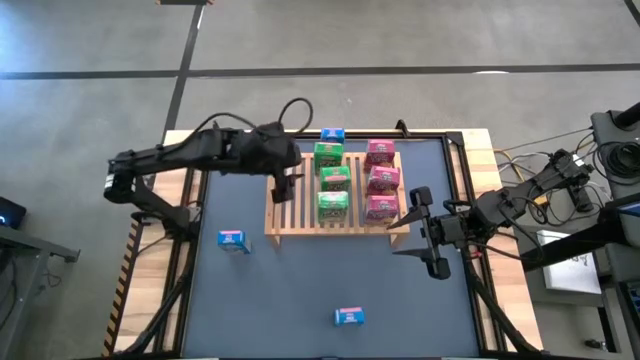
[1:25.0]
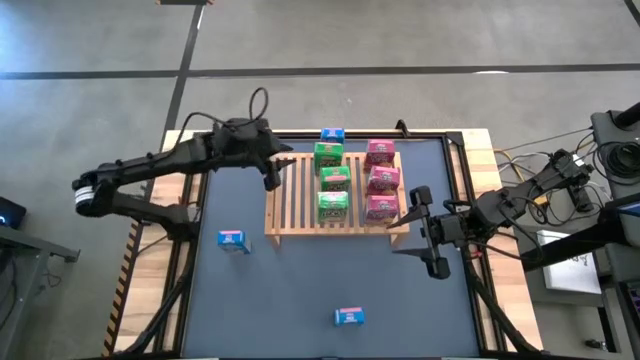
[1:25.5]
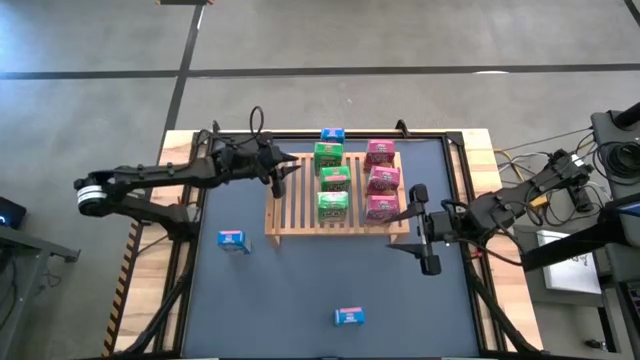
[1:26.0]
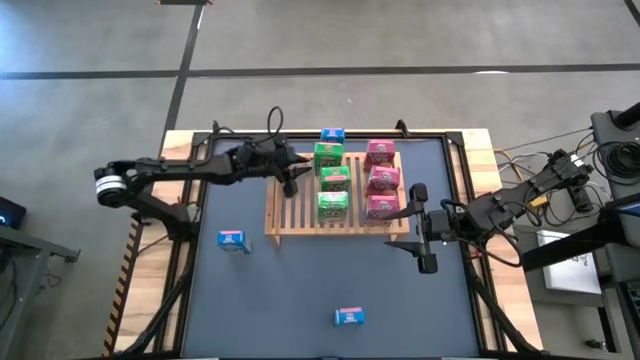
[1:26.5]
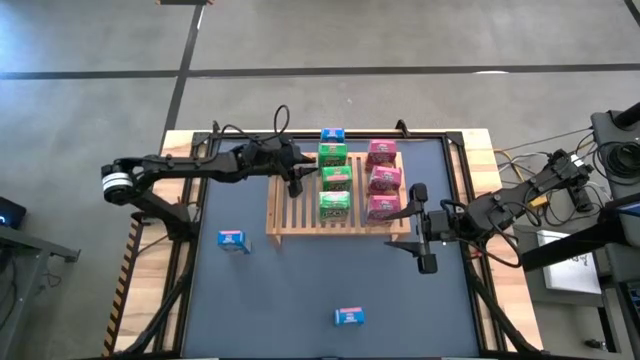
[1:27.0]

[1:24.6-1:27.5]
Task: Stack cereal on shelf
Adjust the green cereal box on the shelf

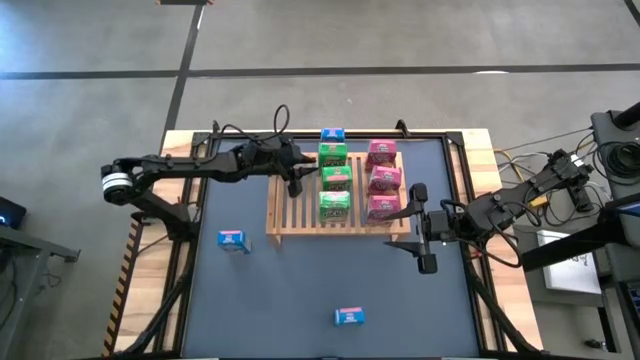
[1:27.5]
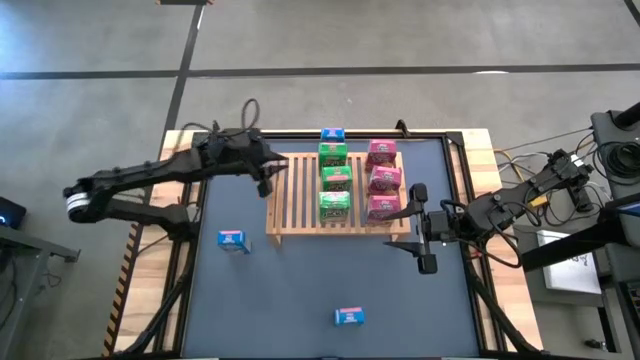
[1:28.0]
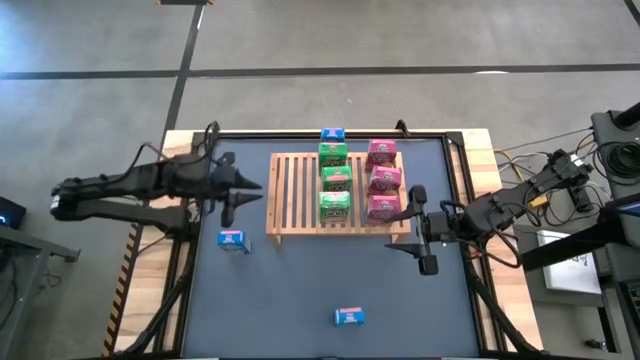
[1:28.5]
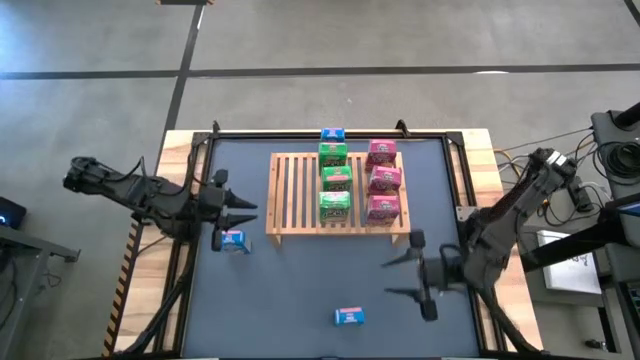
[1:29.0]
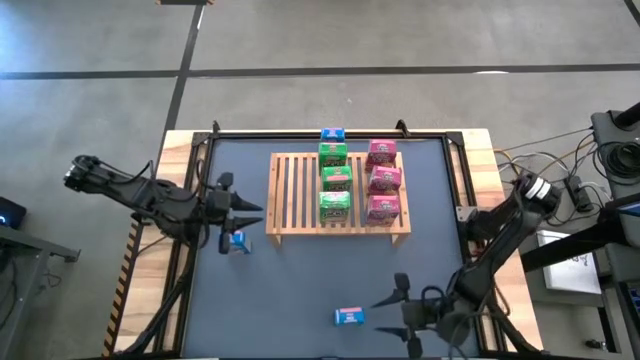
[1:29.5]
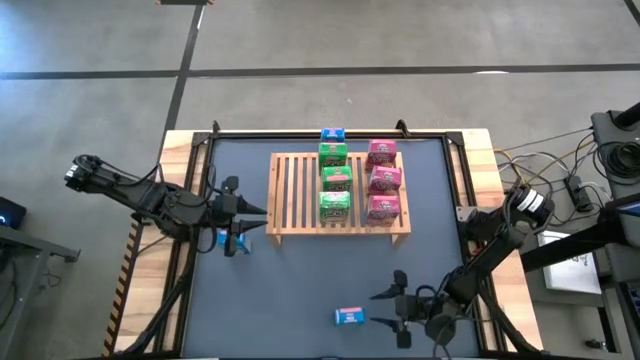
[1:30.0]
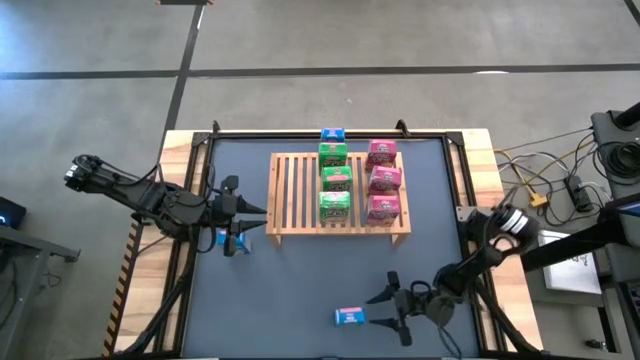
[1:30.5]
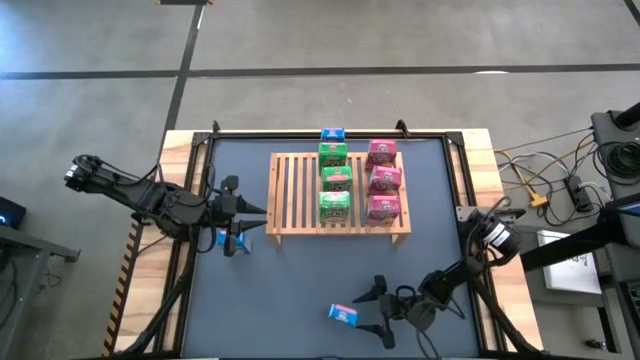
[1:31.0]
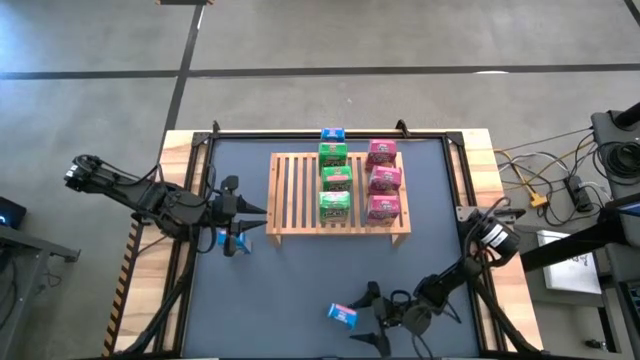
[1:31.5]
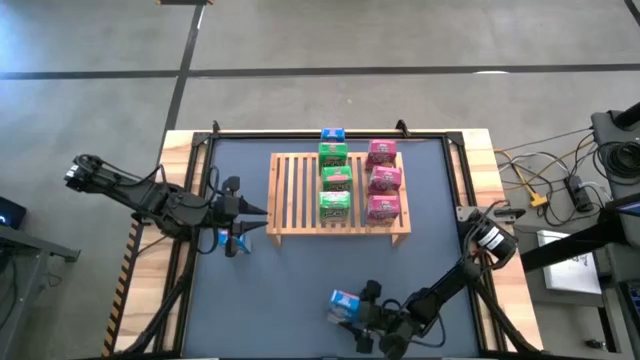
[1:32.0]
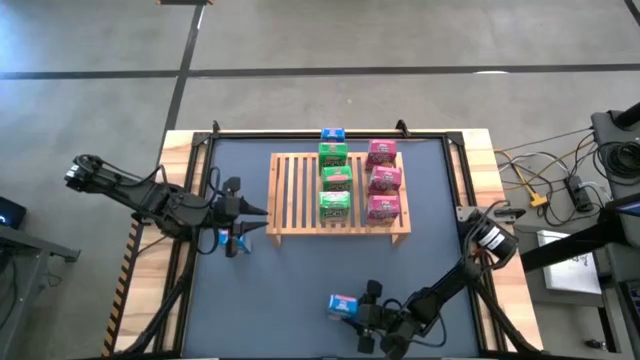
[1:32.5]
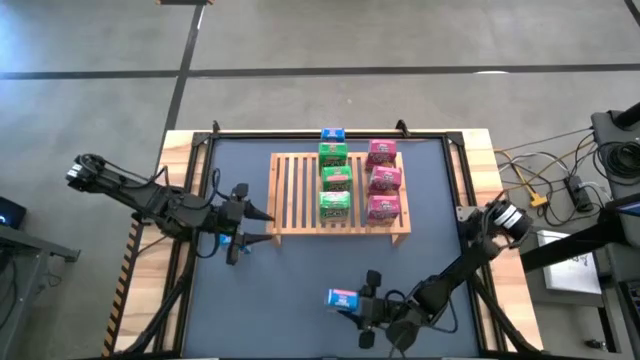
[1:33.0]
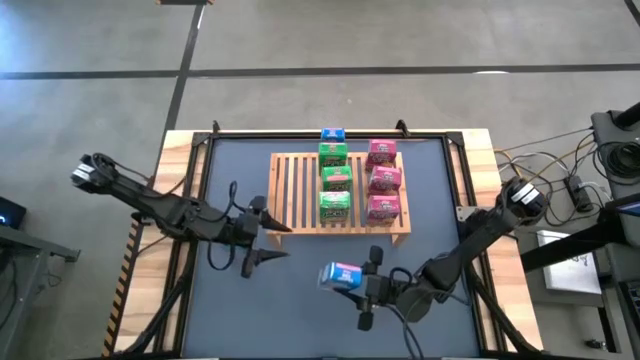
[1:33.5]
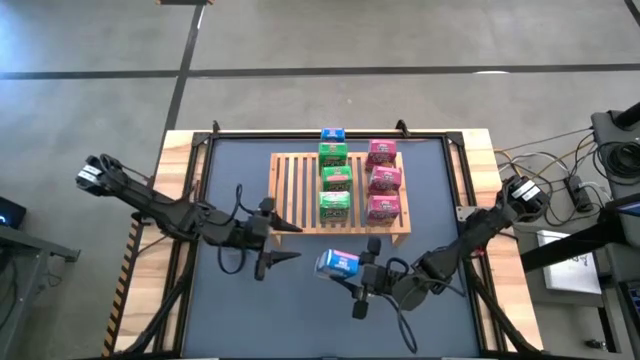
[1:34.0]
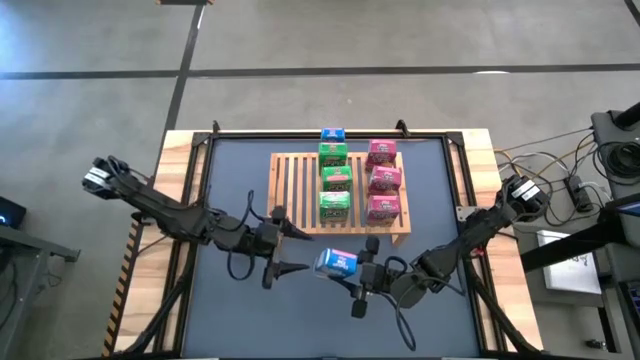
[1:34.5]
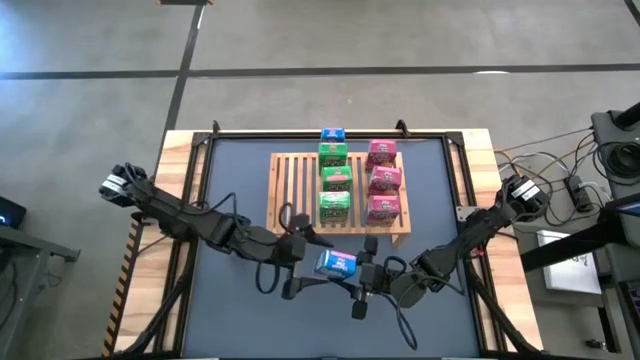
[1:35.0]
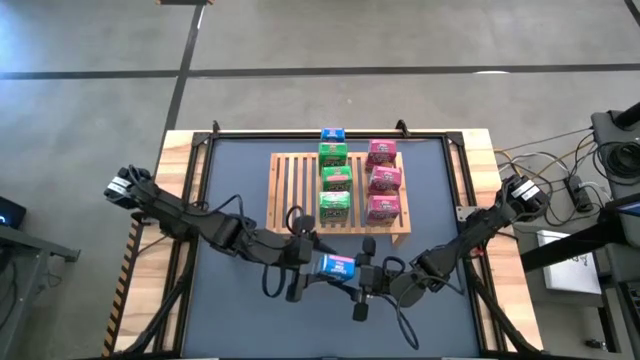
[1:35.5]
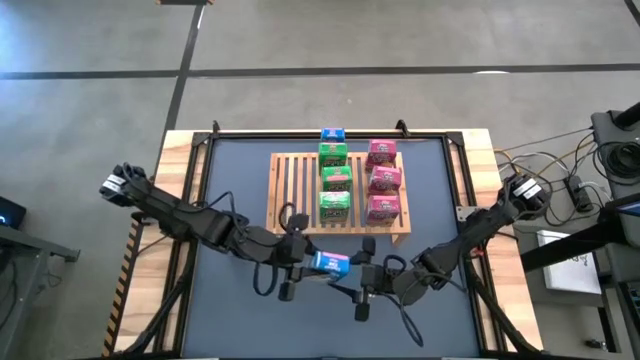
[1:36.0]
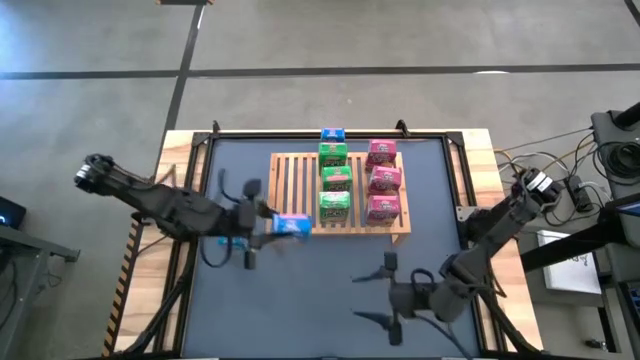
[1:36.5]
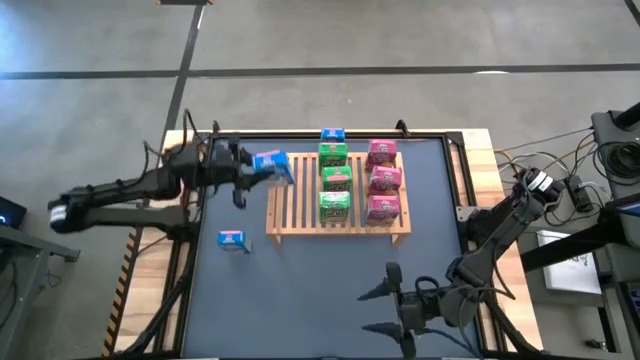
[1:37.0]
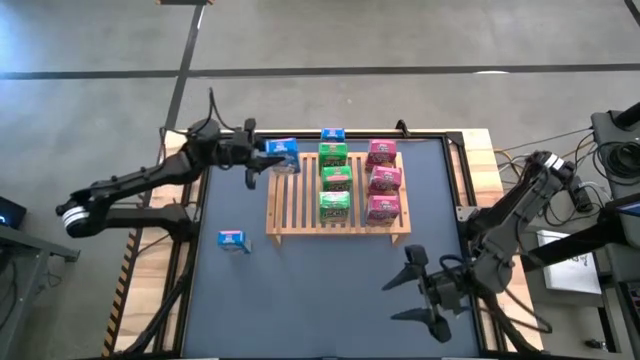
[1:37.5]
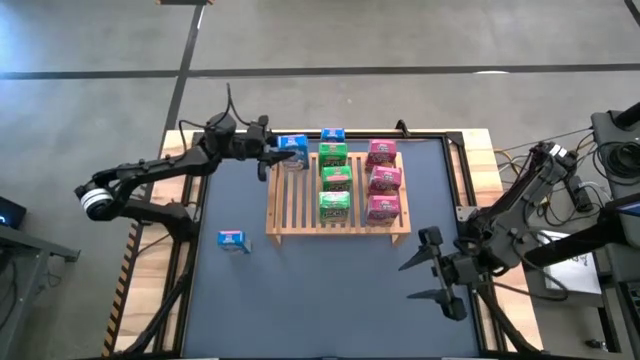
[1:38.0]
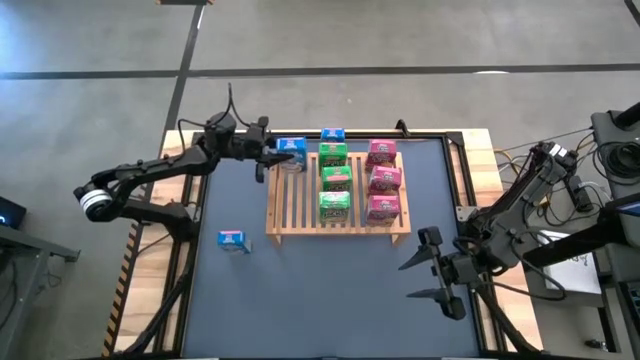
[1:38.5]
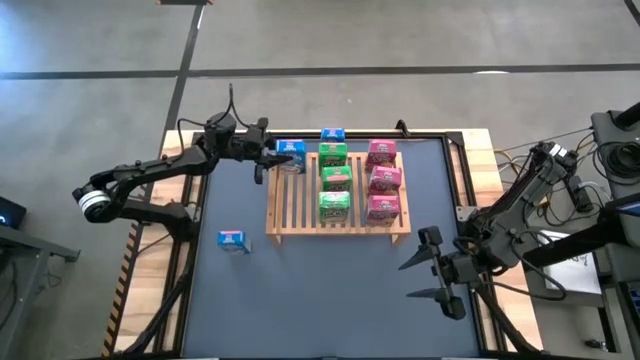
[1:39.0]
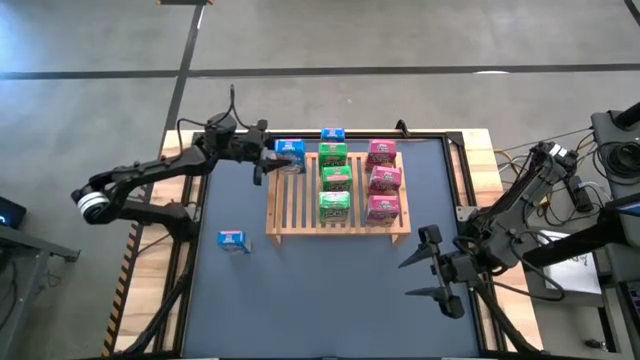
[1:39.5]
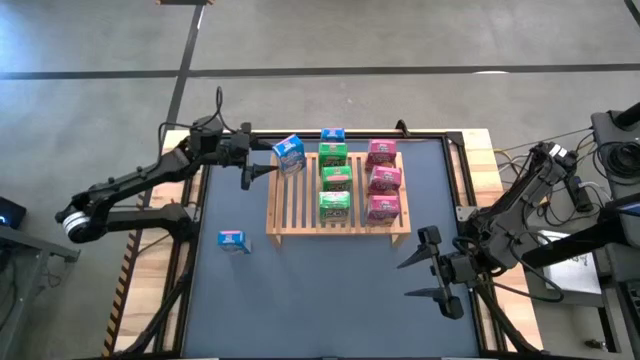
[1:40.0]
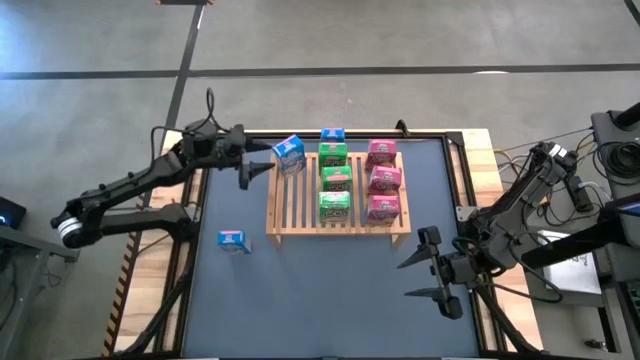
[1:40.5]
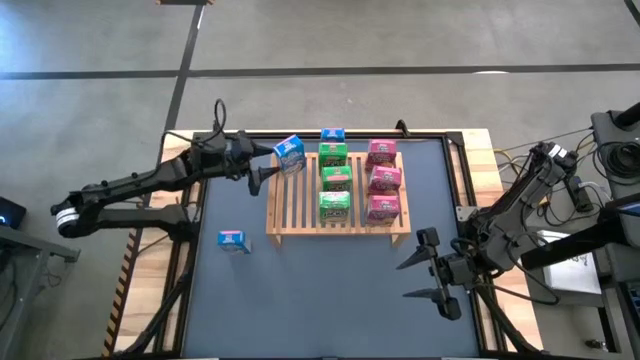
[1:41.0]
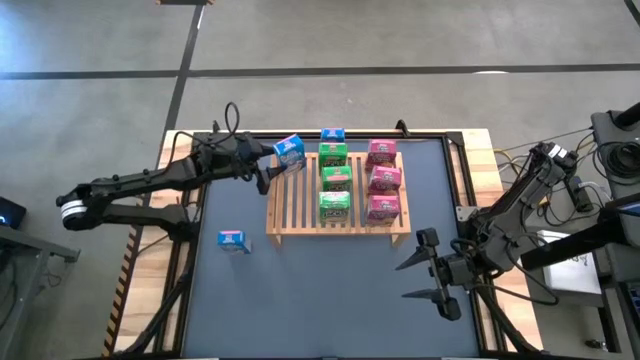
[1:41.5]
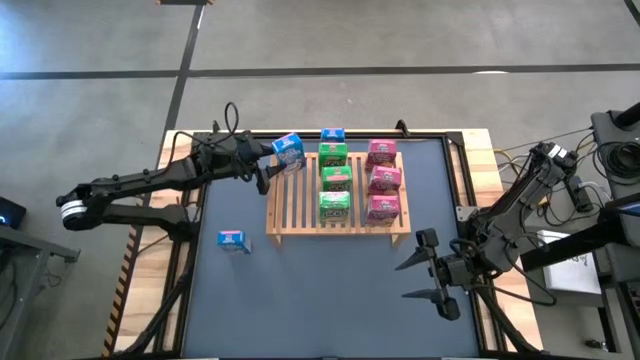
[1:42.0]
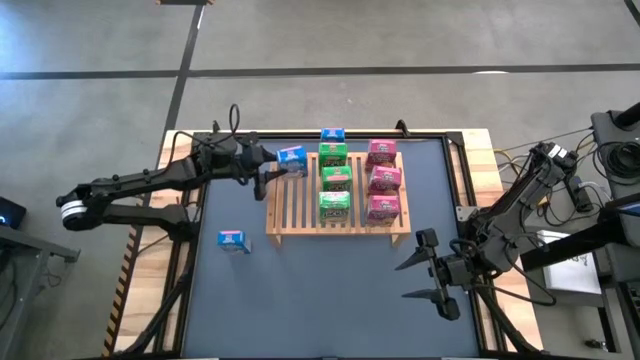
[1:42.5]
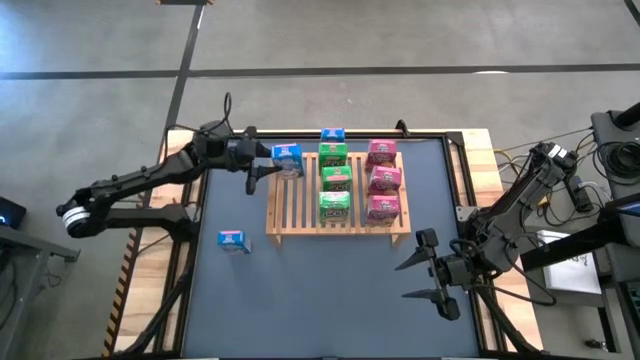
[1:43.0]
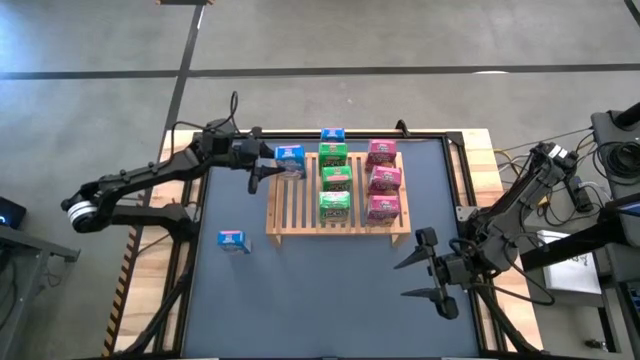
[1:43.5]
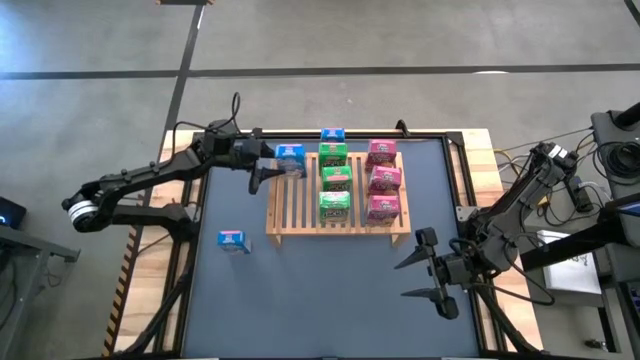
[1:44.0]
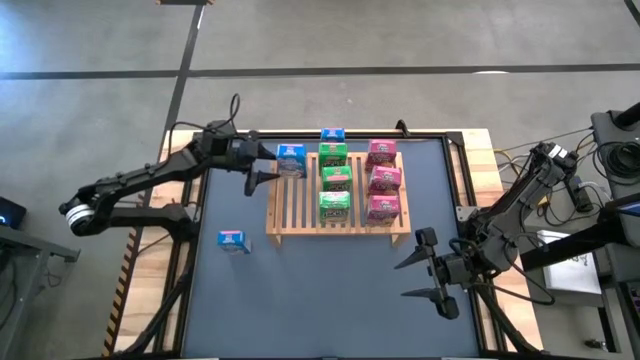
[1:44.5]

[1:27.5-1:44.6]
Put the bottom blue cereal box on the shelf

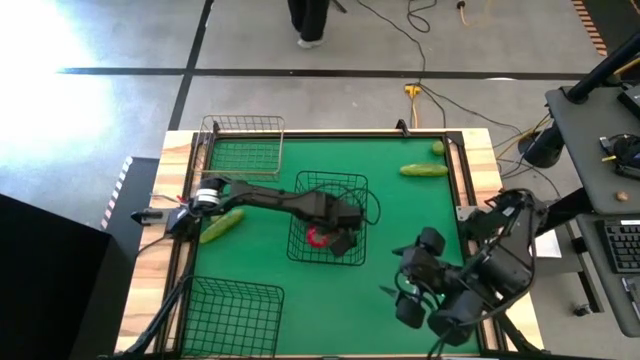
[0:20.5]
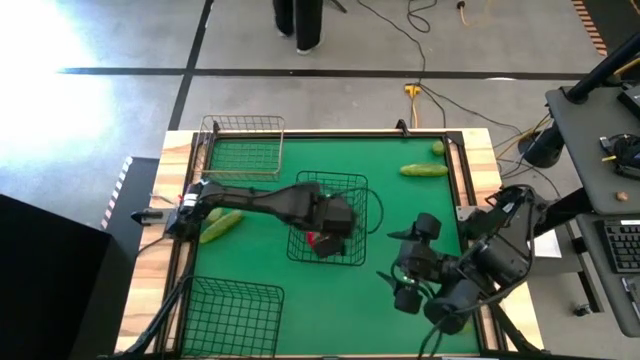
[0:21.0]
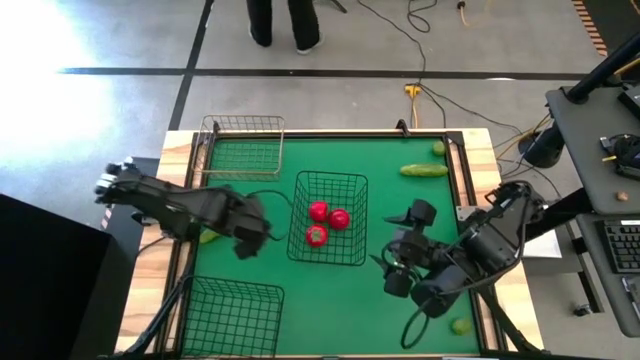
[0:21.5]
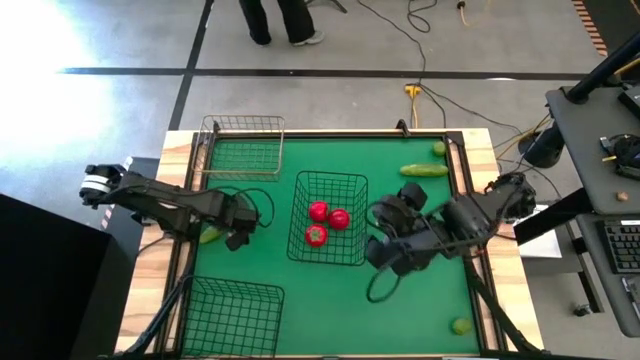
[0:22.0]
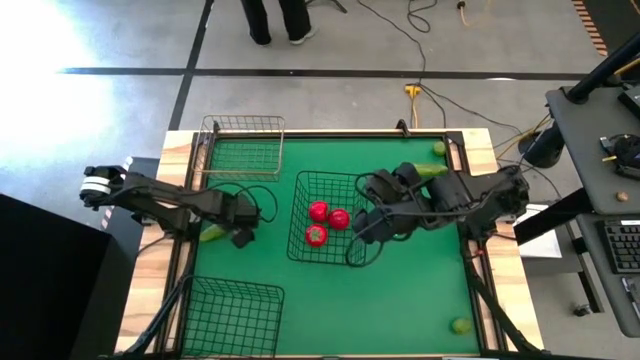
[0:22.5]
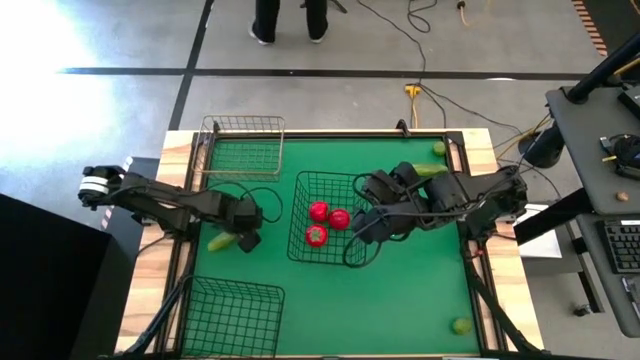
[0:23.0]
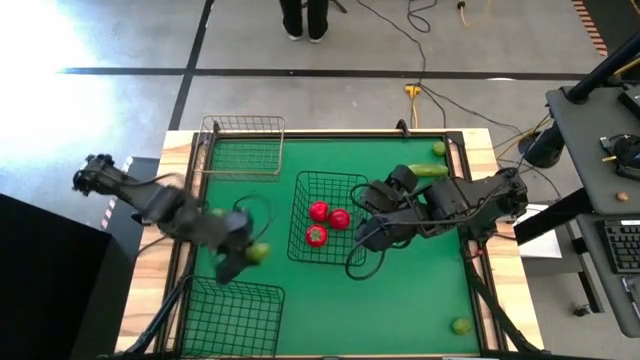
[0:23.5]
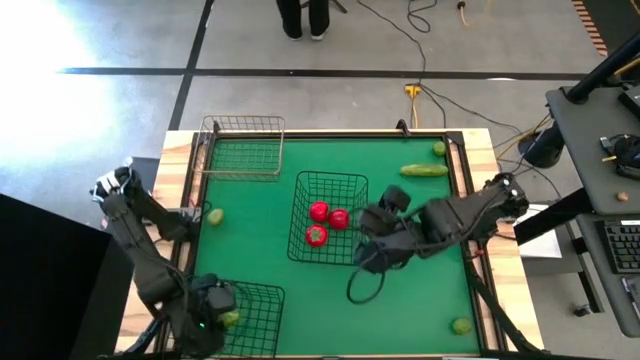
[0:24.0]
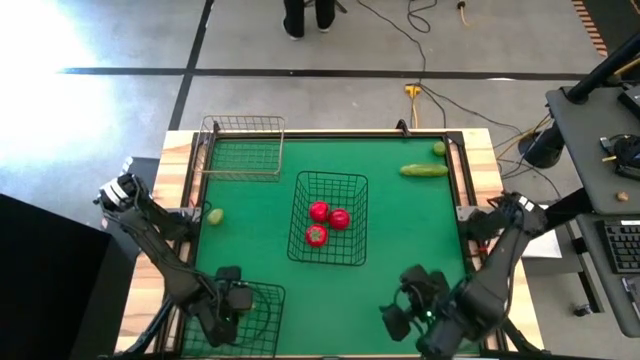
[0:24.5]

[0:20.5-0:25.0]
Task: Sort produce into baskets
Put the left cucumber into the bottom black wire basket
